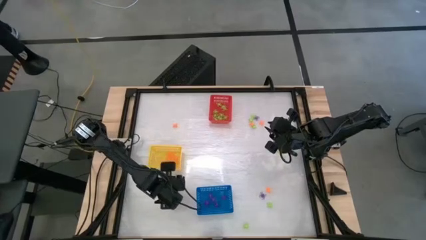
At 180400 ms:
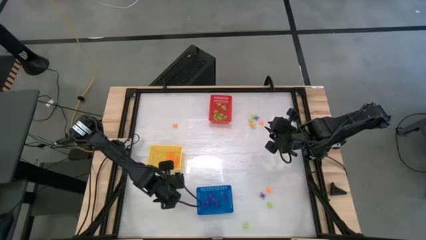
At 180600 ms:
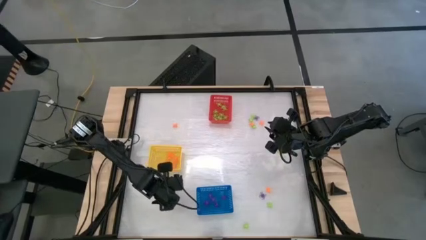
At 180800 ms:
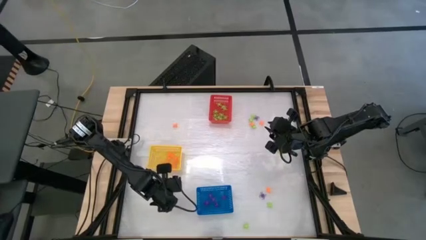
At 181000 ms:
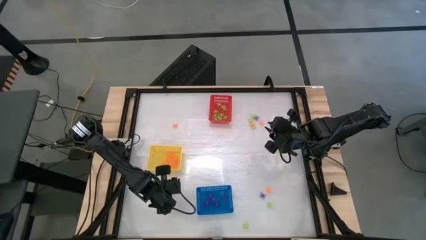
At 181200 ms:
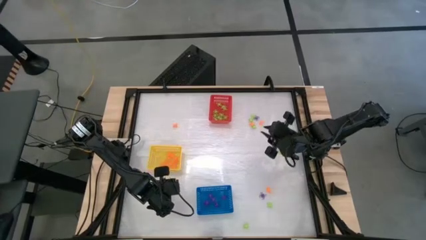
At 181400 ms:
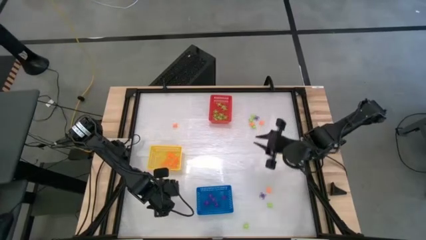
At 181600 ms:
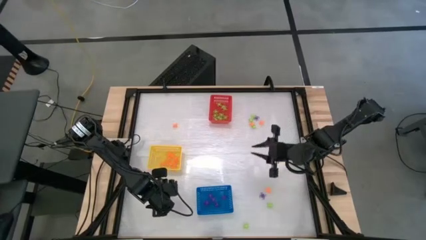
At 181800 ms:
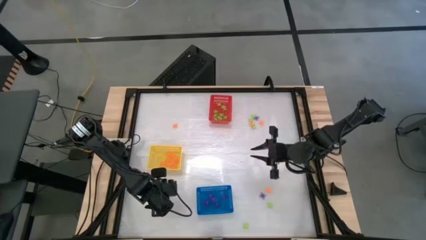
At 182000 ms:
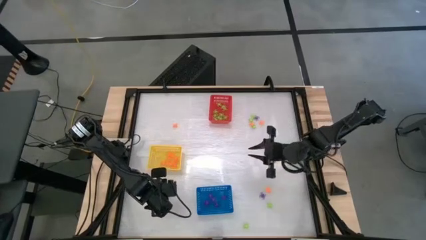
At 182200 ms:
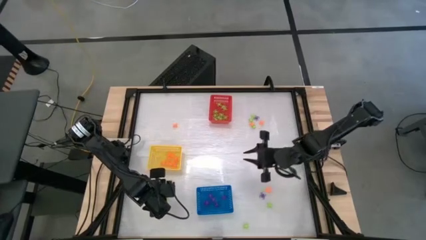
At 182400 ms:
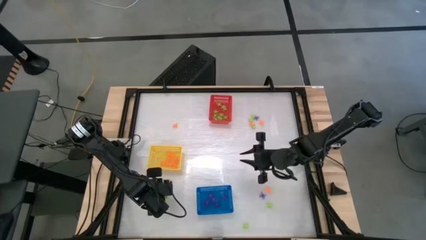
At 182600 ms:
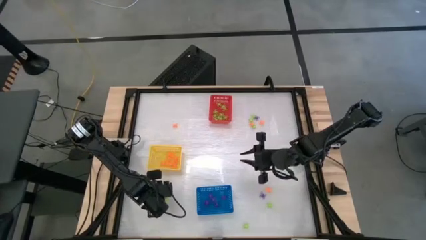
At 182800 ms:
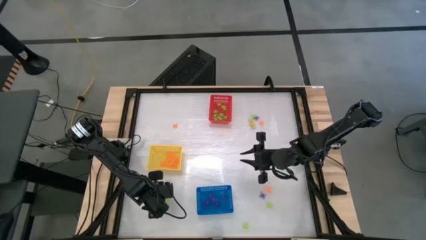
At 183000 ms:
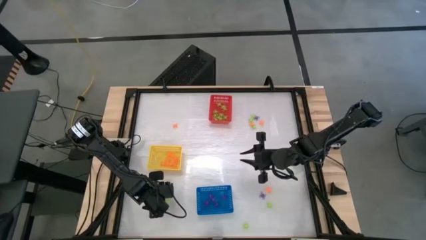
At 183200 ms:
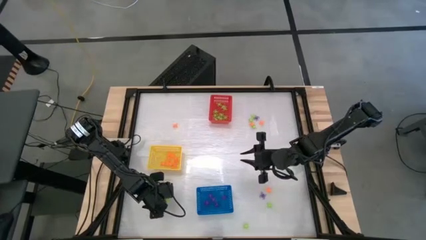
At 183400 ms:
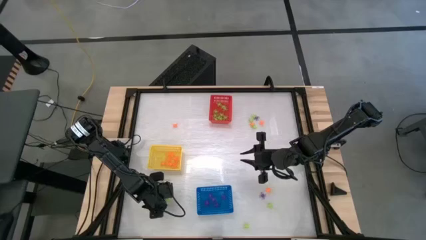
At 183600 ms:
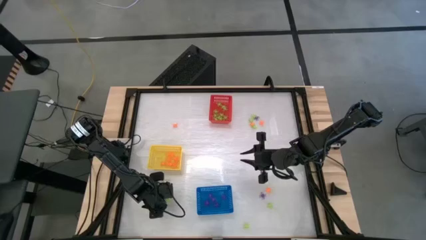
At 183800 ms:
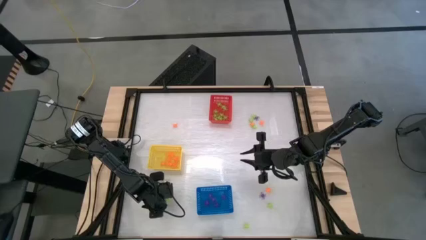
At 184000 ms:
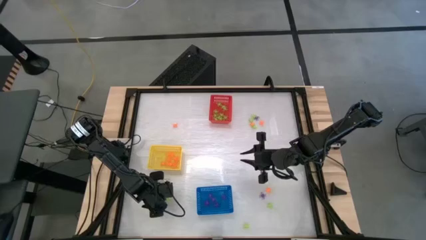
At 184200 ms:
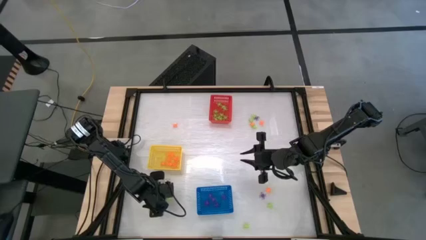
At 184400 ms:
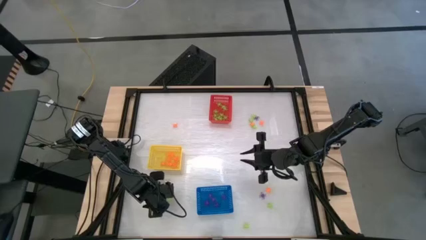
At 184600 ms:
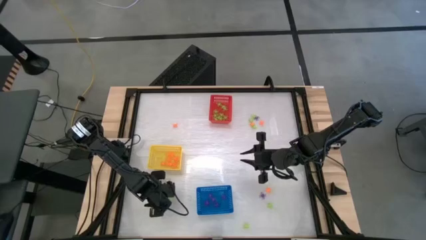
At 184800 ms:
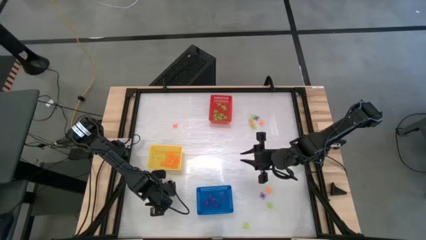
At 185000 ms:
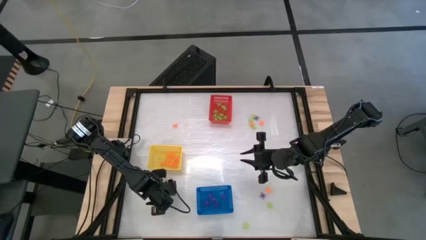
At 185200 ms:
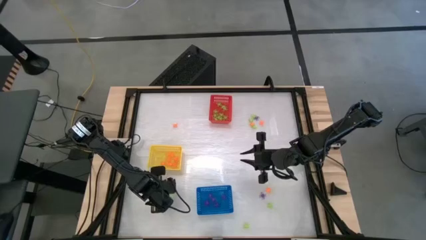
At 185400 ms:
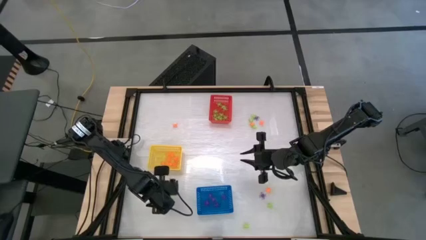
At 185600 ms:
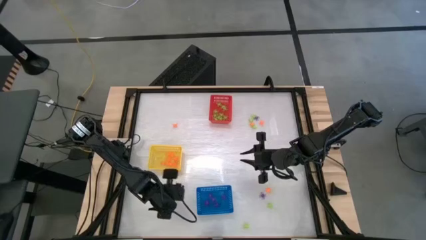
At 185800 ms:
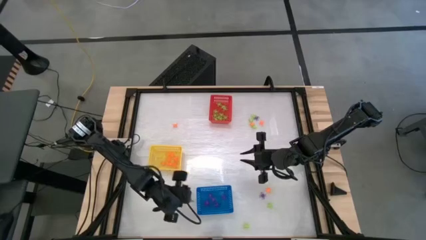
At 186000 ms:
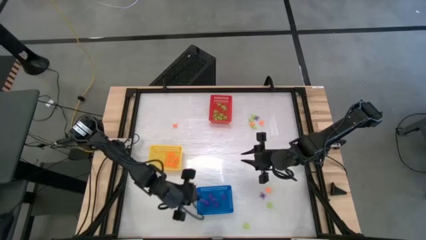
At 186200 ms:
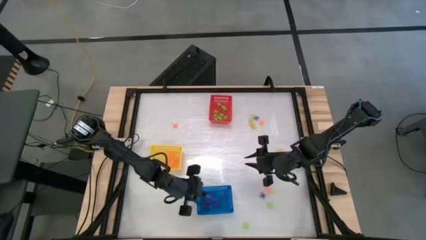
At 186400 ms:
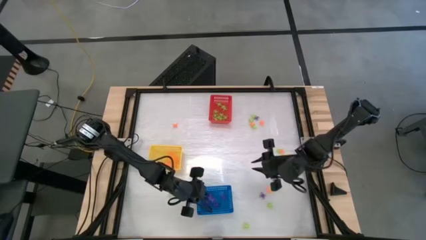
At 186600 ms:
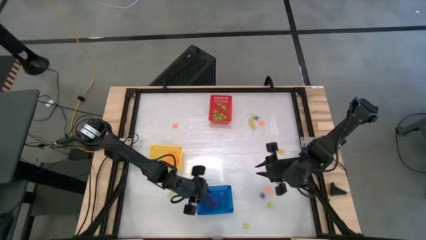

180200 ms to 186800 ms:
Task: Sort Halloween decoration
Put the purple spider toy into the blue basket

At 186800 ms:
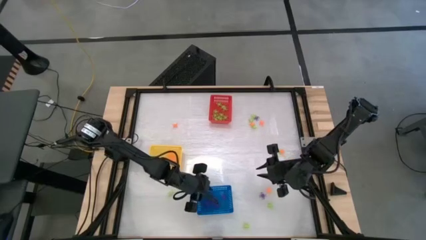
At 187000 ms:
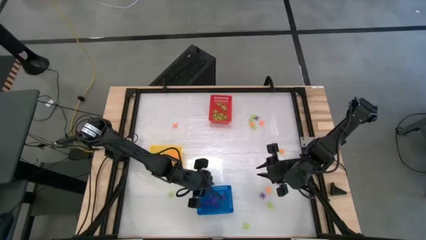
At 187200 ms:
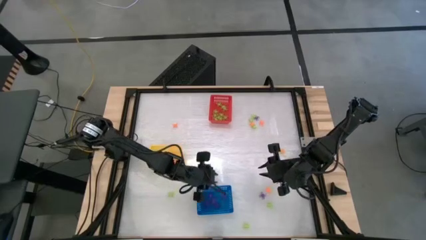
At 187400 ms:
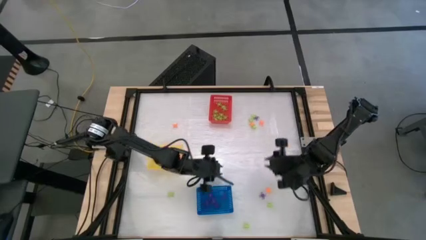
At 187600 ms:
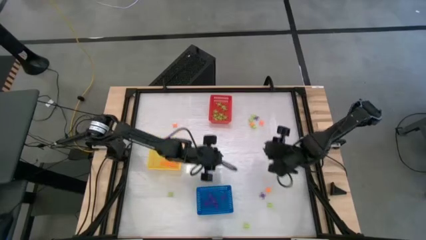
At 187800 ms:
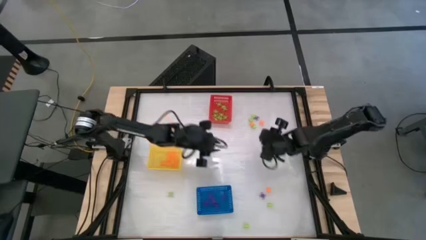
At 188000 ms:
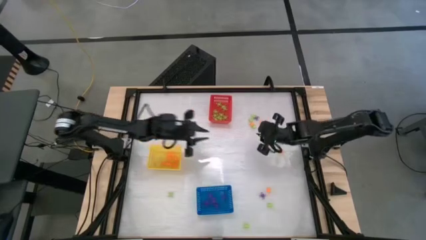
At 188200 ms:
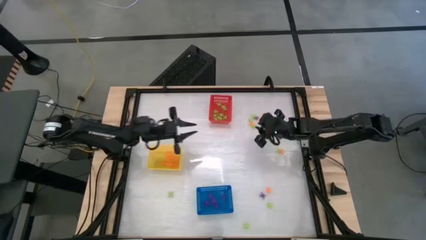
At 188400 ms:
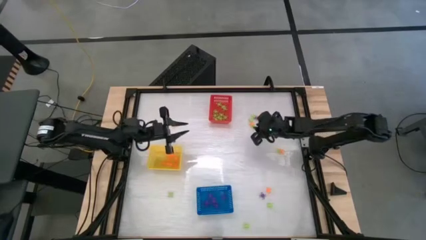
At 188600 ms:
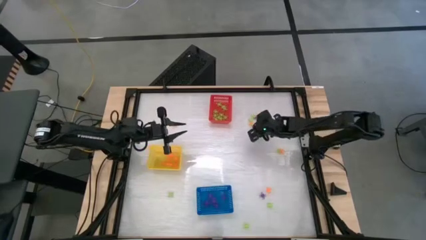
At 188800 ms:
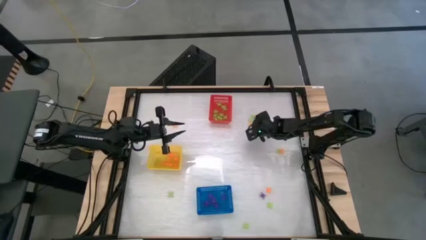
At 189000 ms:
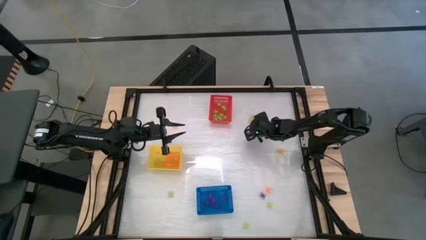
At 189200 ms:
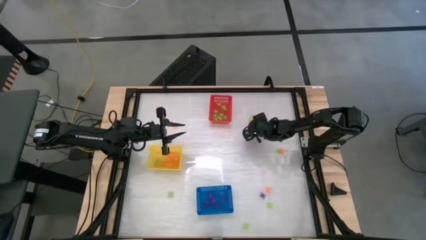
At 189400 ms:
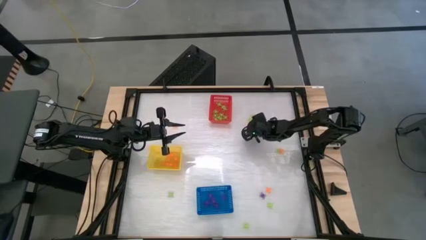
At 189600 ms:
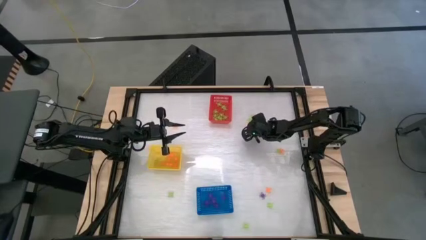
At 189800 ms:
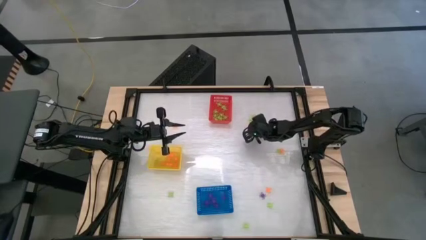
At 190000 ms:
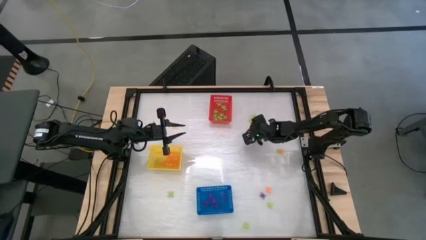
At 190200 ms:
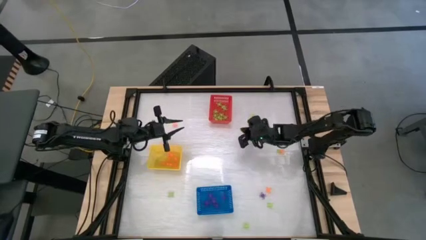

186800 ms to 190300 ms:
Put the green spider toy into the red basket

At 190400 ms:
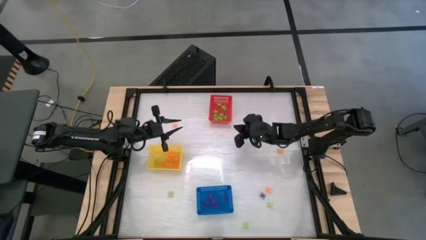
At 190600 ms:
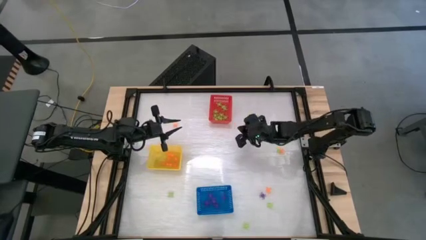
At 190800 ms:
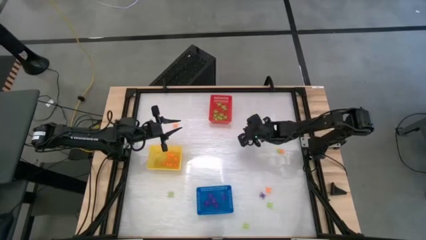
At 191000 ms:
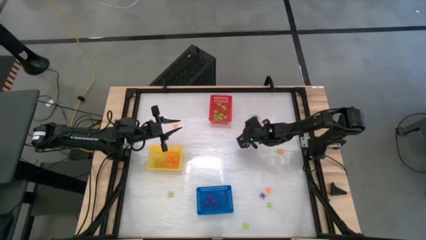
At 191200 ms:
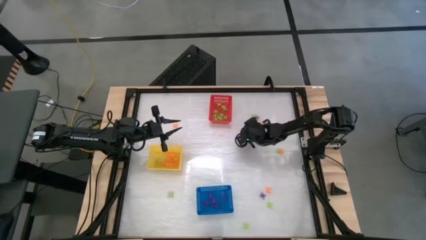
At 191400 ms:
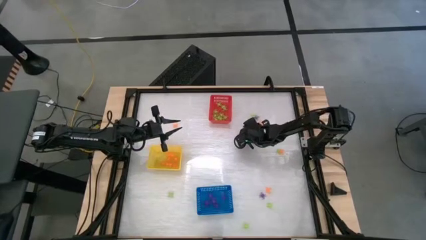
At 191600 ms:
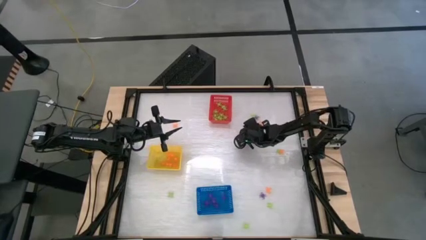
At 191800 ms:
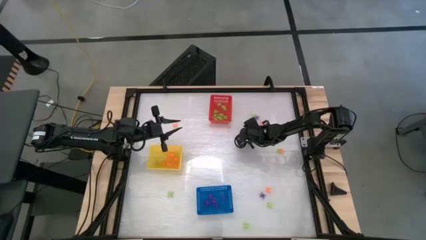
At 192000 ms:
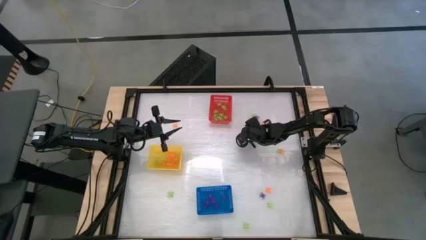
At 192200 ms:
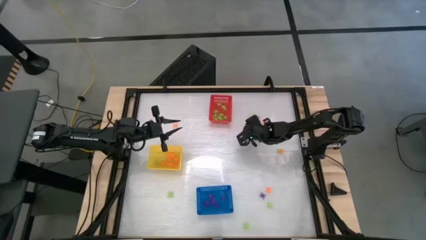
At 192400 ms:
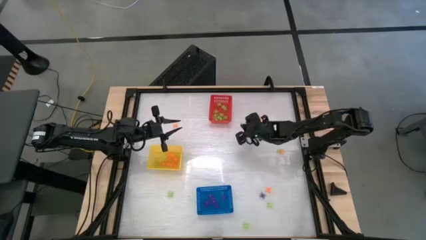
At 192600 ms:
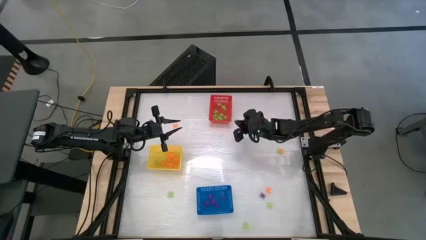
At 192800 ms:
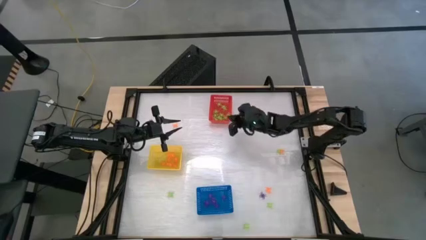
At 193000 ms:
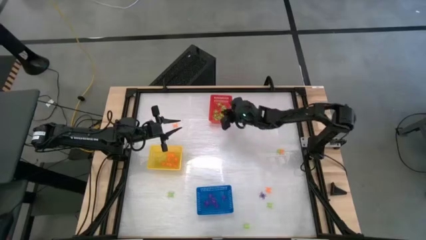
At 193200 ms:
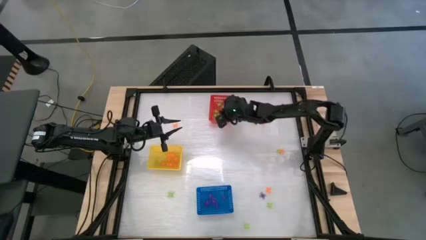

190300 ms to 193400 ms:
Put the green spider toy into the red basket

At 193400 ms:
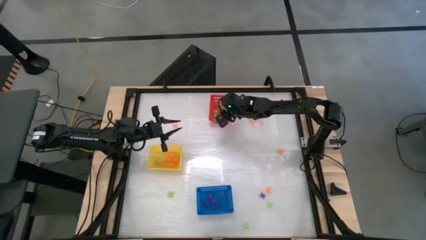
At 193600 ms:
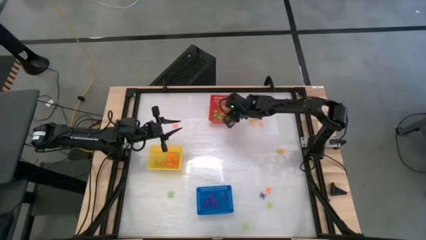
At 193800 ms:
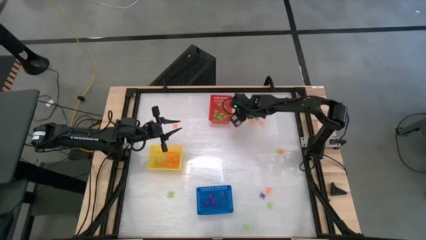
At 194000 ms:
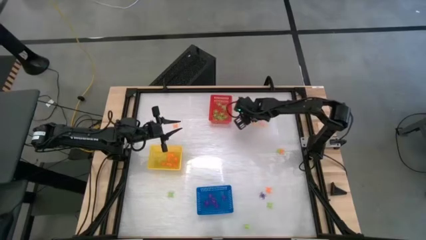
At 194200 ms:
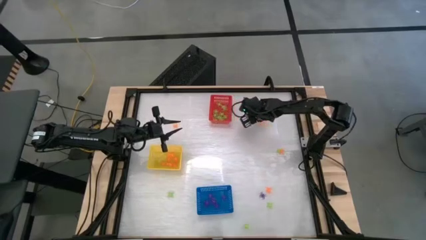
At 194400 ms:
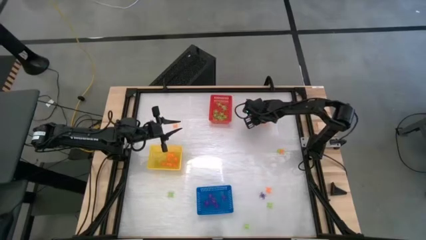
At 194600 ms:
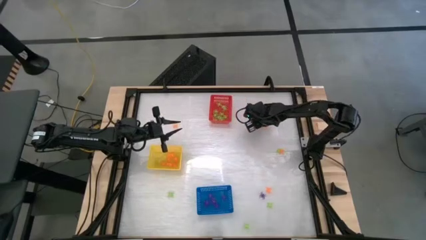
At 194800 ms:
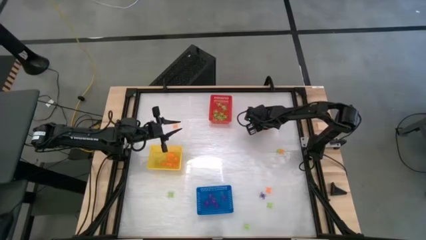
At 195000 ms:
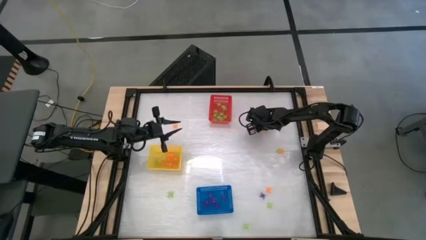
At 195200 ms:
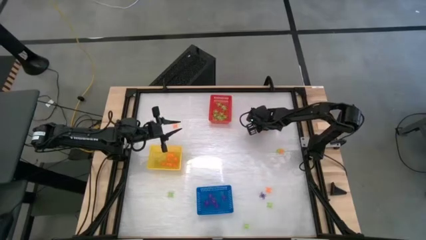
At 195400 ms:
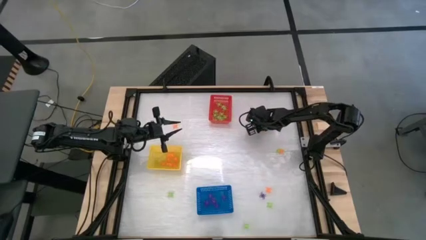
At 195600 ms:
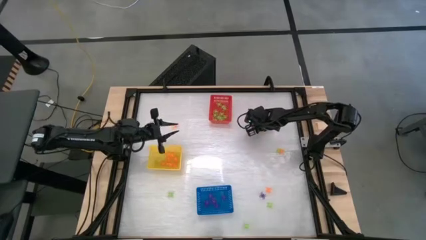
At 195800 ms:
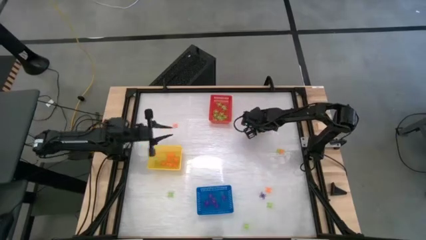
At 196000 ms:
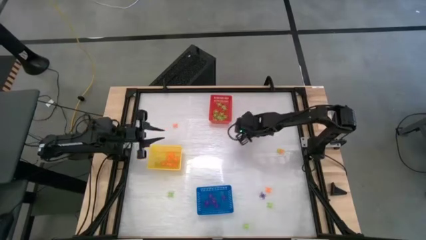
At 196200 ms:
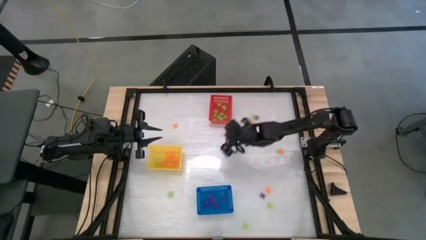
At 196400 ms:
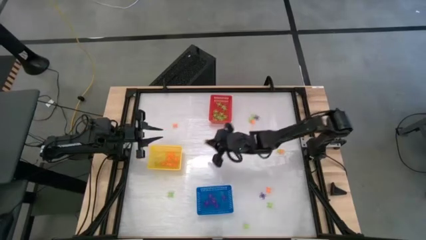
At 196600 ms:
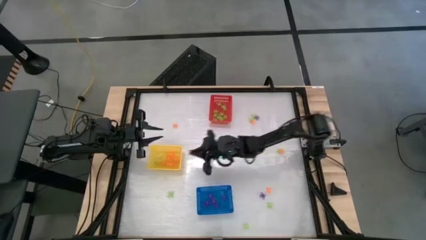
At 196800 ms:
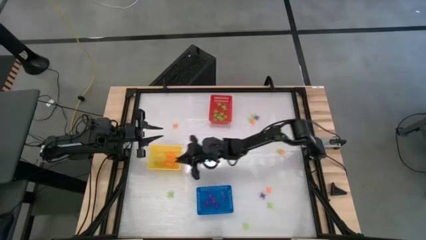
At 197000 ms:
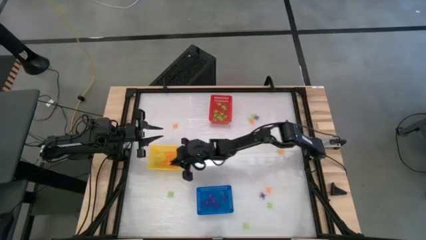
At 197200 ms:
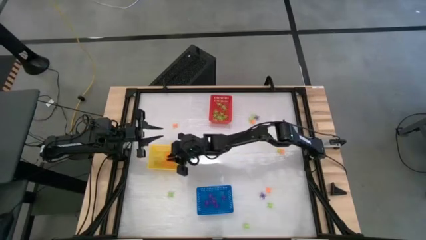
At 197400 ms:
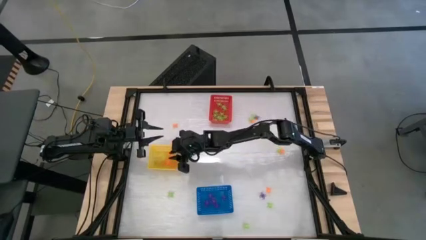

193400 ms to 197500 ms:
Put the orange spider toy into the yellow basket
